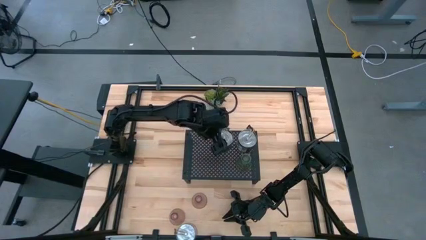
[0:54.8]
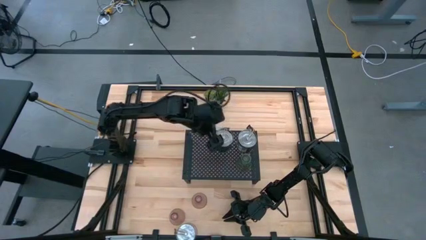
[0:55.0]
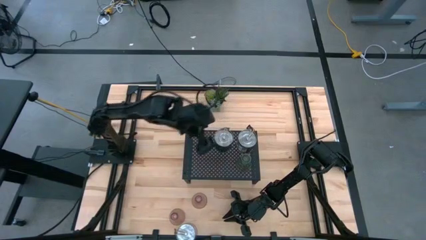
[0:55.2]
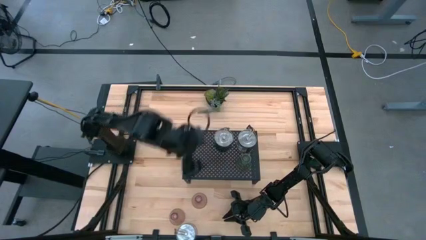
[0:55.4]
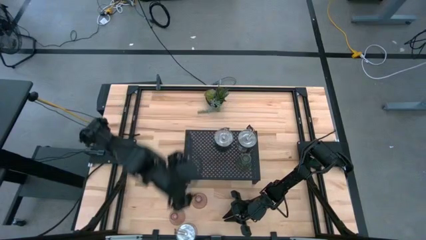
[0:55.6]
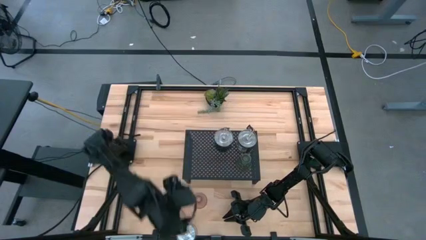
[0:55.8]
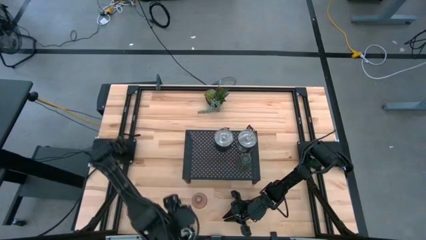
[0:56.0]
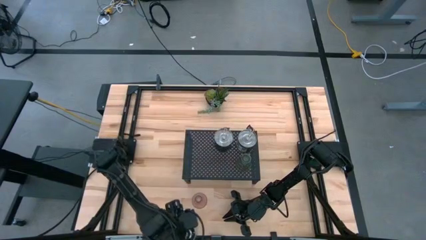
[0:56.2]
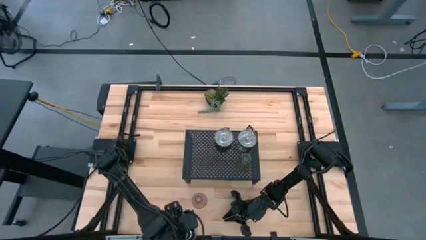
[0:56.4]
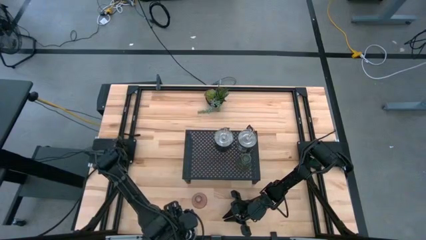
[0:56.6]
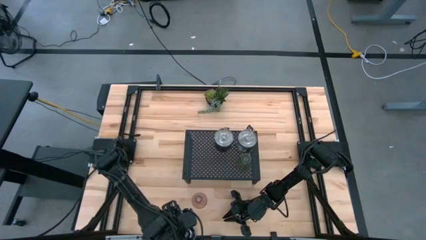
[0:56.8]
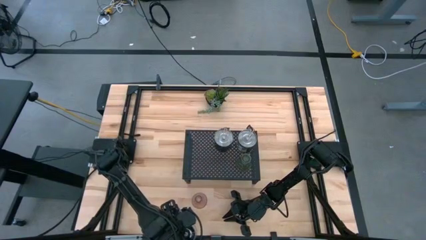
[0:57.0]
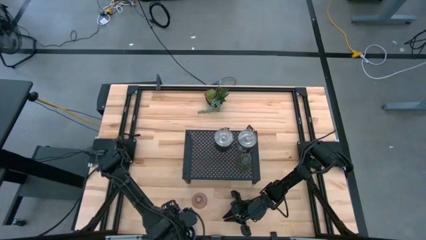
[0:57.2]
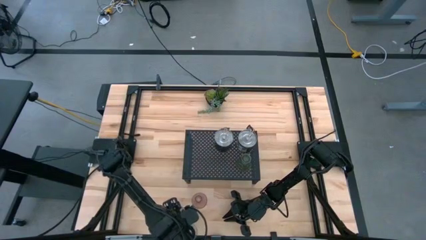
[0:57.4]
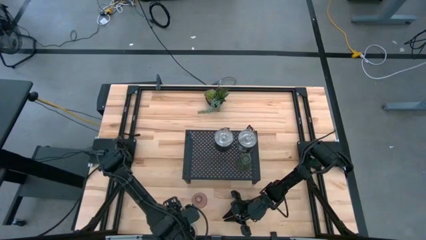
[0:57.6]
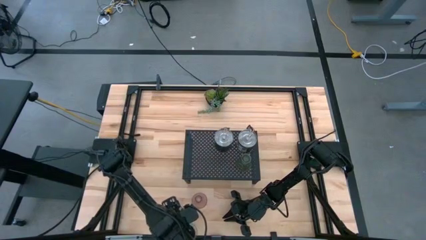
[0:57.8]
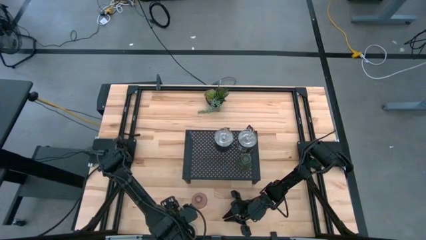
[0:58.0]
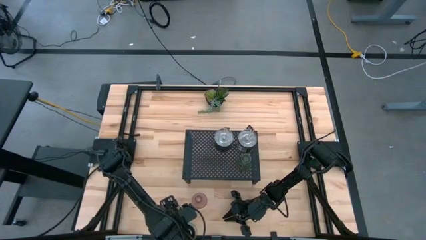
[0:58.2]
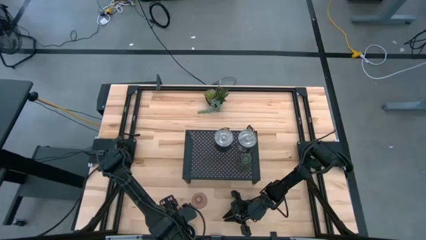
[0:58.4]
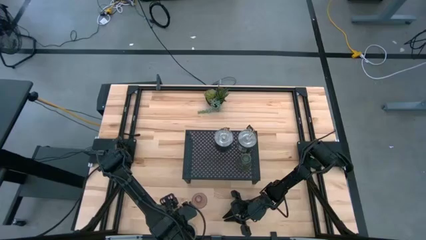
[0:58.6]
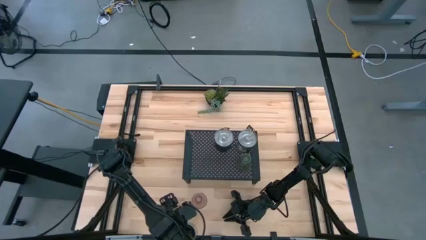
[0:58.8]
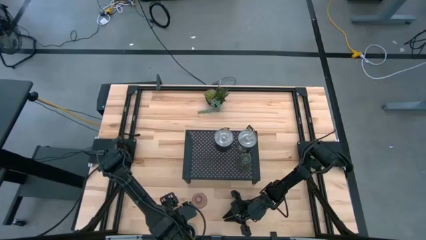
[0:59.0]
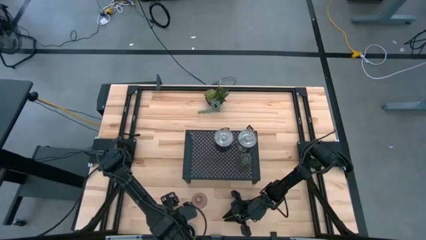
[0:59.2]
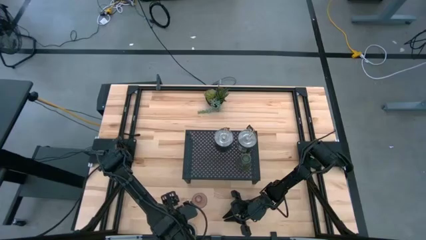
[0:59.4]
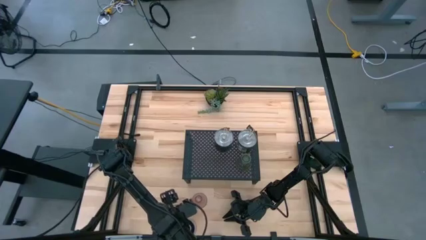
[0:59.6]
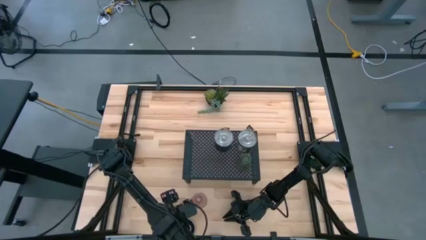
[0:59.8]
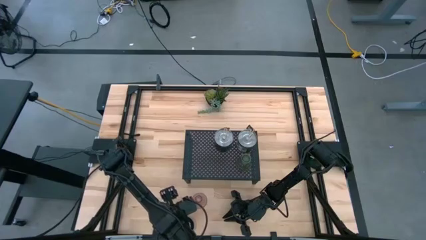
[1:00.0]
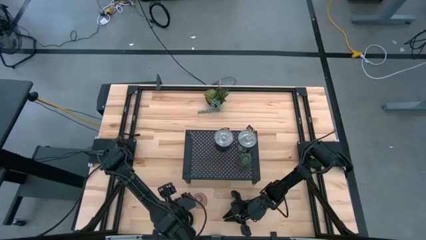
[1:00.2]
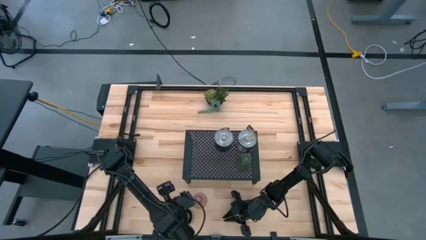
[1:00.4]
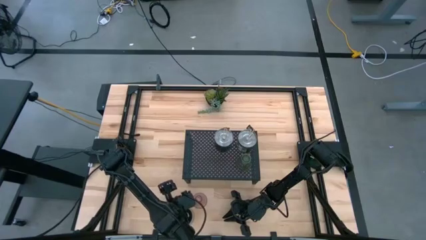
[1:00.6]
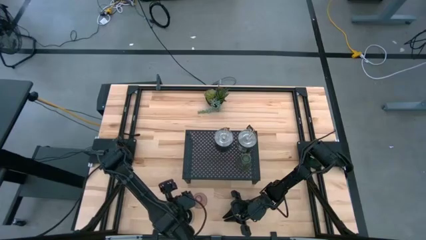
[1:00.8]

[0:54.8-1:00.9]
Task: Pick & Place candle stick holders
Adjust the silver scented candle on the table

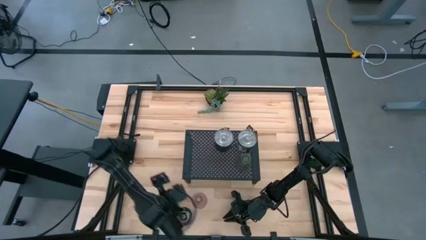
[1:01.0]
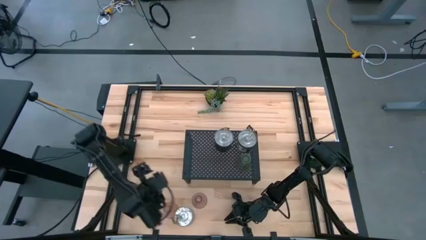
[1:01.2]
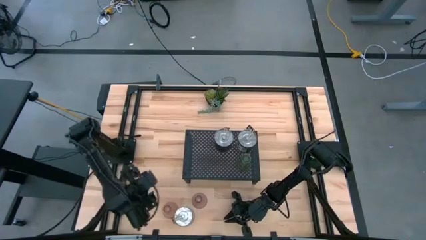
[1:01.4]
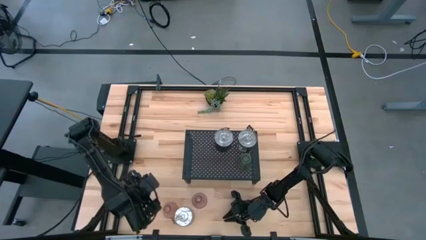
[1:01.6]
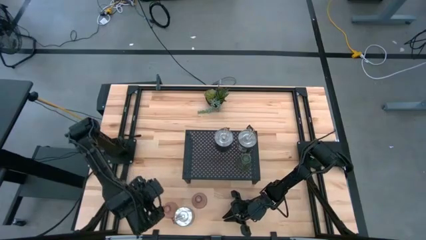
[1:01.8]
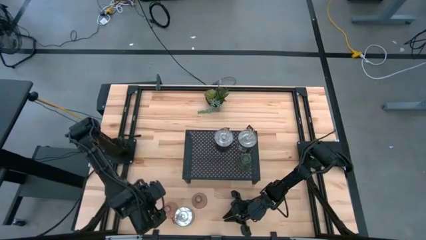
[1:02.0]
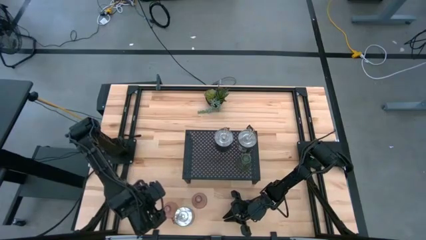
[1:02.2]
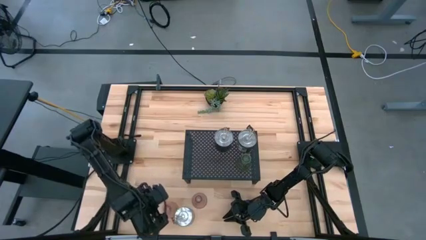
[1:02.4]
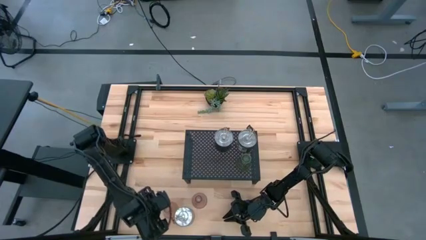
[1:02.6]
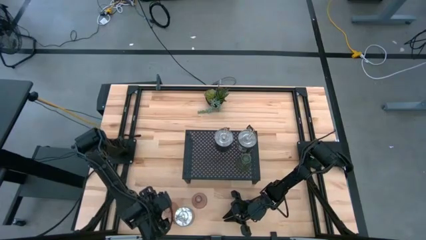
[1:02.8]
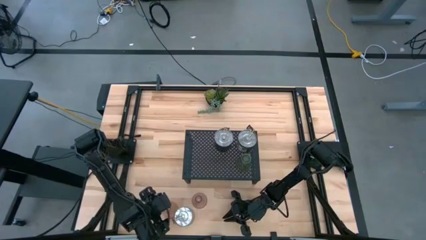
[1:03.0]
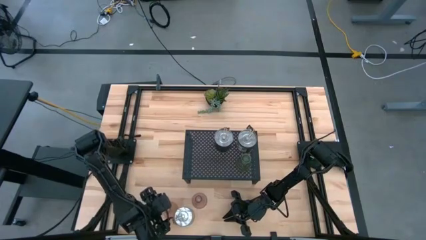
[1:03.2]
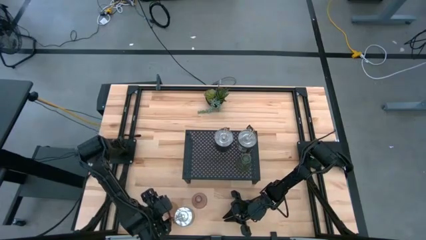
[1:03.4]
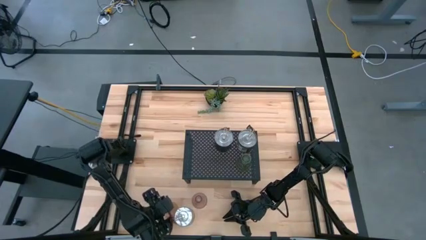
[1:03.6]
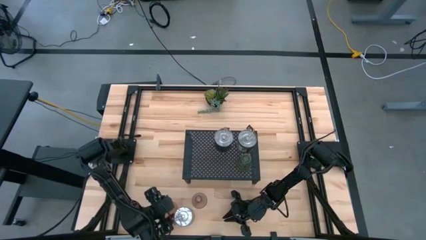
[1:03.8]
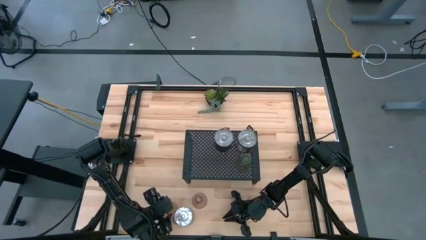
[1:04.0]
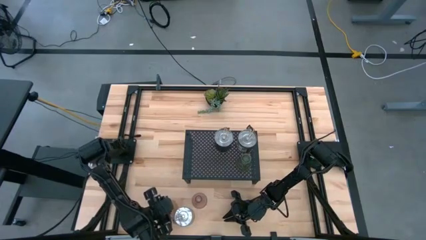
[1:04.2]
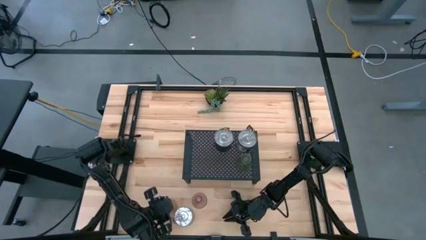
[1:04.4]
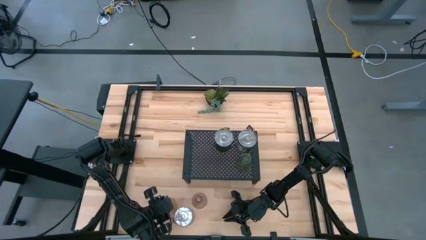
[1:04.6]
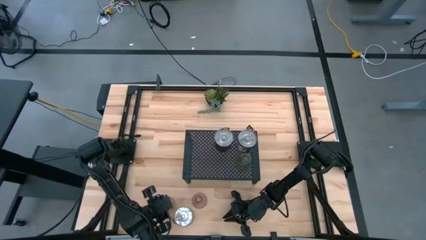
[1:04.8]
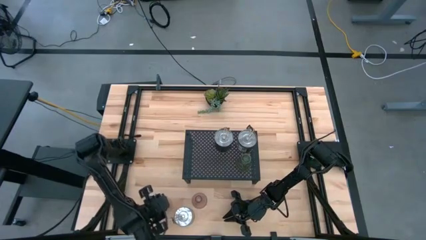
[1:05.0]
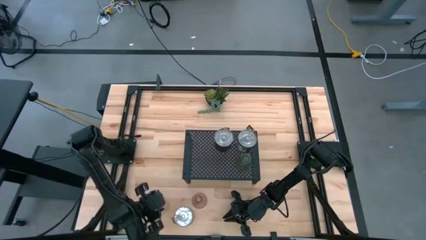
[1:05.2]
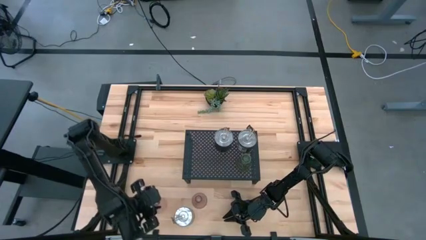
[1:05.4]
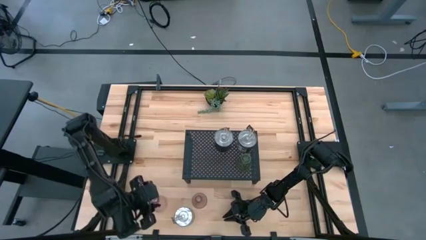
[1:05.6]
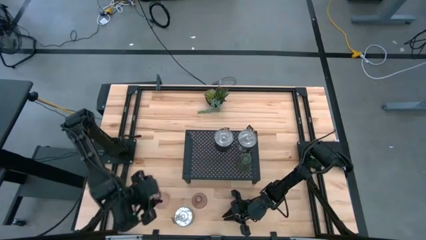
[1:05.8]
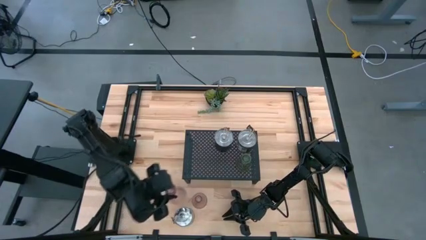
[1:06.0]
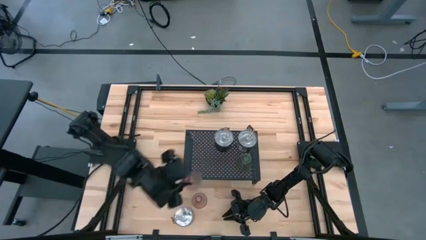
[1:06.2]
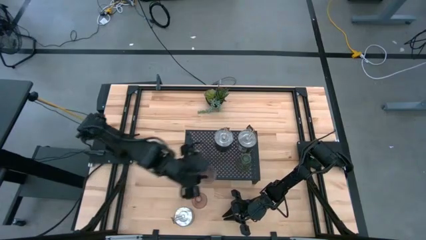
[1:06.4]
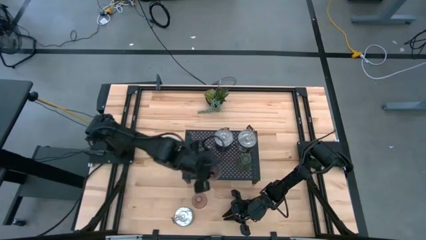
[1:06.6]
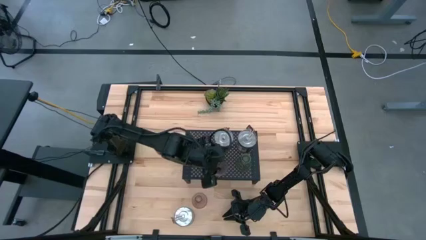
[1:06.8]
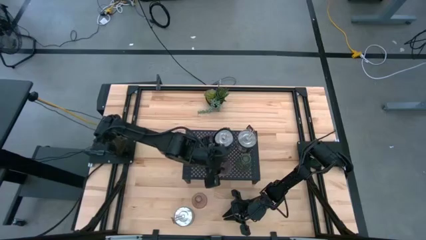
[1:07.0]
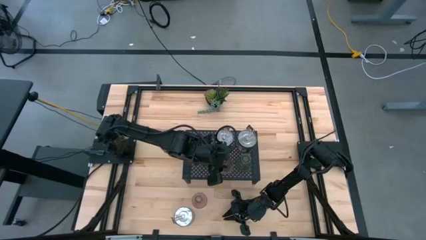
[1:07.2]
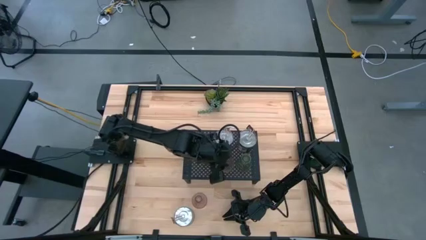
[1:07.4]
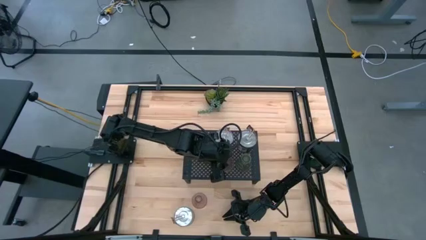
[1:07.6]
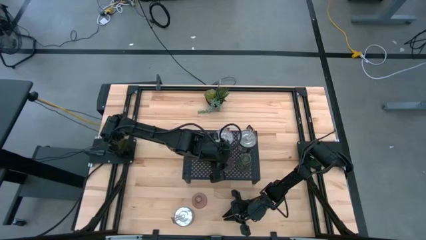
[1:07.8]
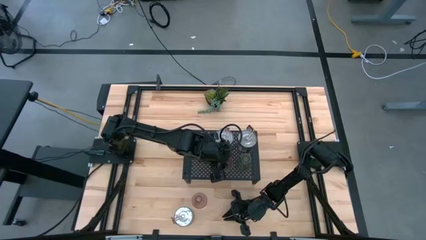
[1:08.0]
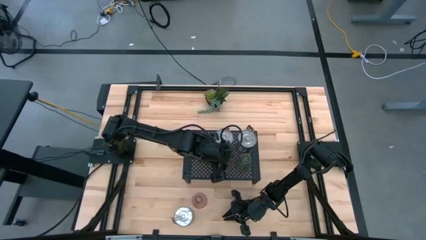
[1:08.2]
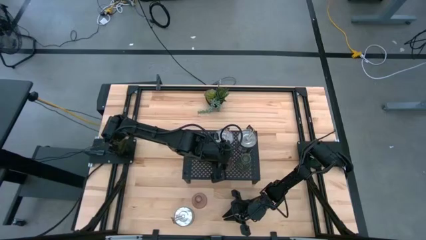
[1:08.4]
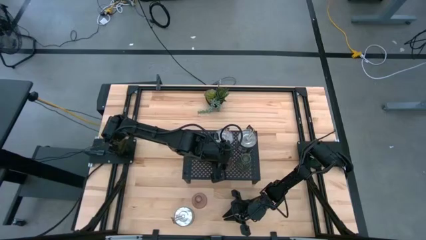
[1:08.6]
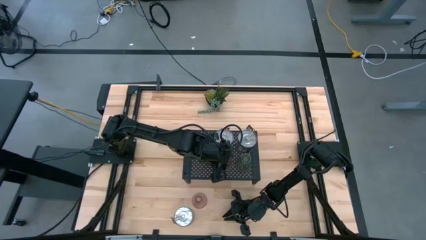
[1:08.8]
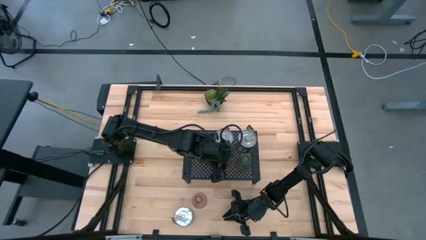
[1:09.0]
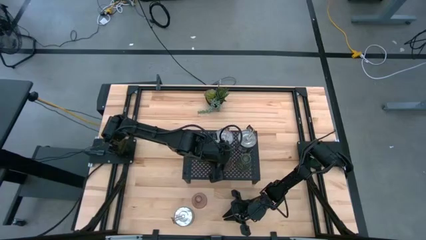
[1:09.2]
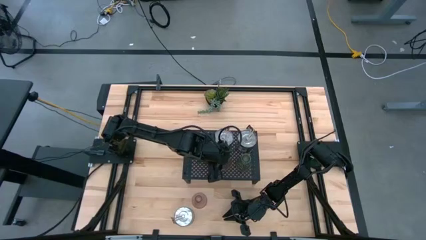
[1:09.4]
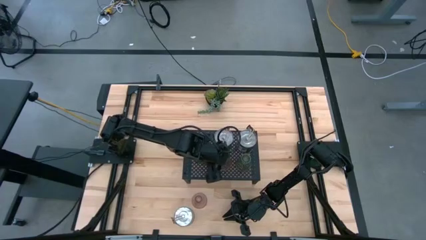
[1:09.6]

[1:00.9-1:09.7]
Put the left pink glass candle holder on the shelf aligned with the green glass candle holder

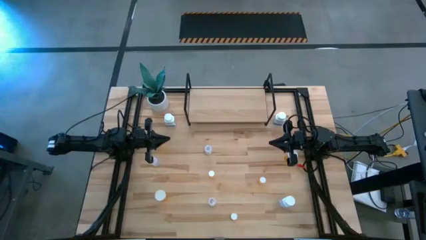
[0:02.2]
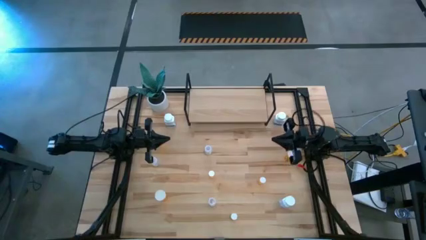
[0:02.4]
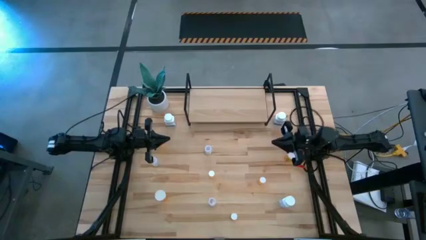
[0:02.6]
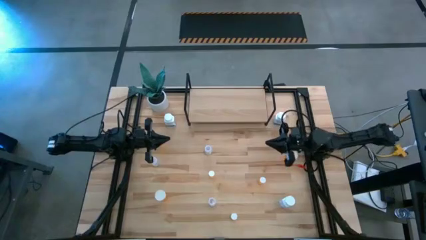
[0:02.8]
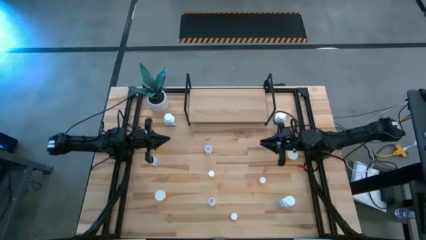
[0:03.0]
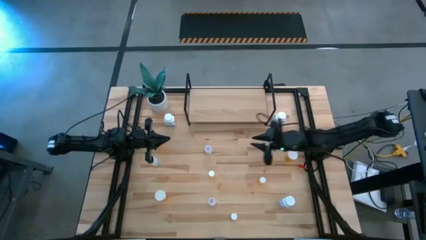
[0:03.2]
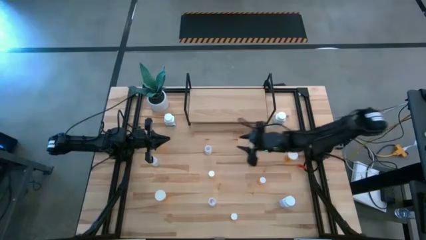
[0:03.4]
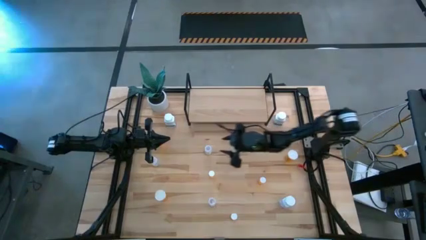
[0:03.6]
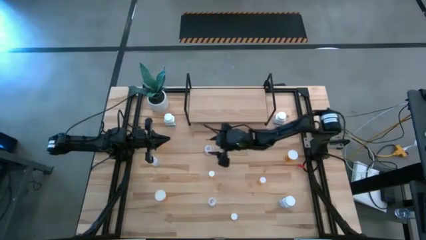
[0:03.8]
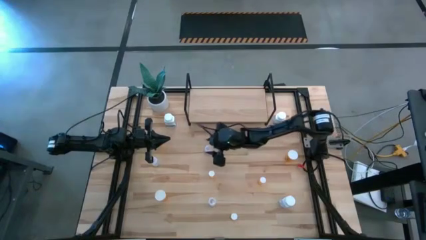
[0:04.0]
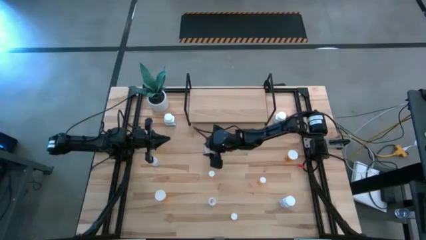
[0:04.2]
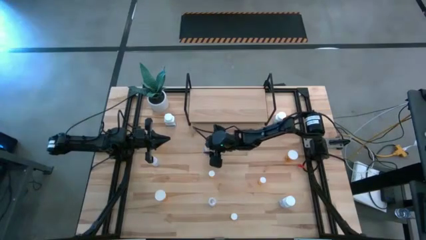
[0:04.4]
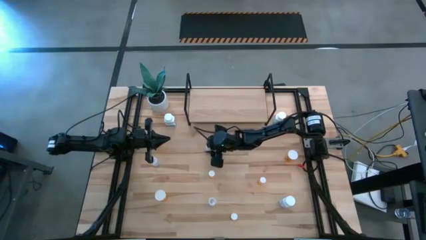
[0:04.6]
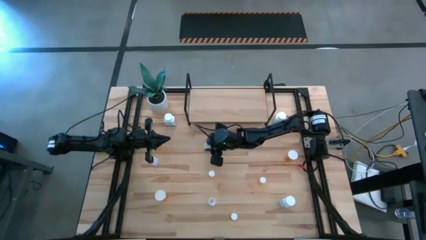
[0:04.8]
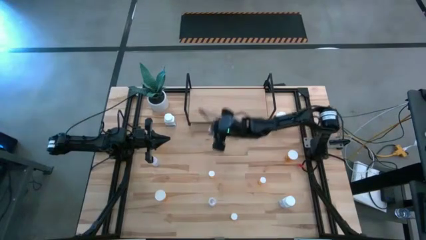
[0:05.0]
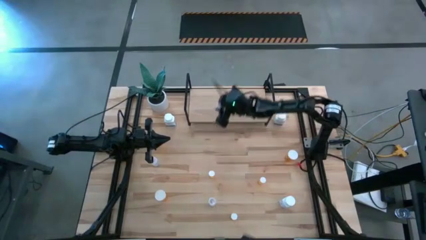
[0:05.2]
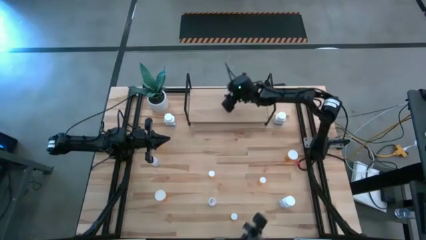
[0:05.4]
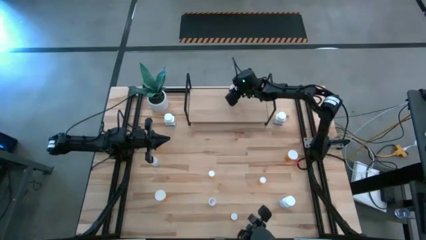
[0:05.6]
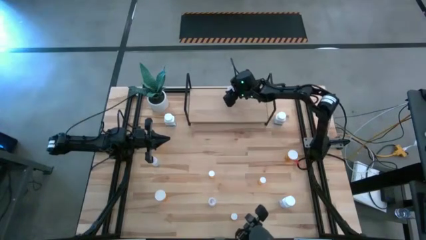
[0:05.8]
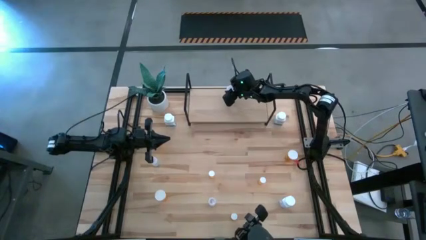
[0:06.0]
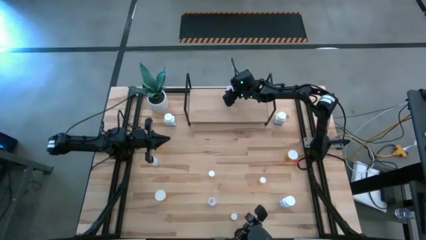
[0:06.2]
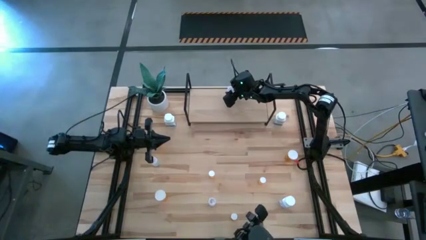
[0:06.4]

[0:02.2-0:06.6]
Task: Pick and place medicine bottles onto shelf by color
Put the top right transparent pill bottle on the shelf
